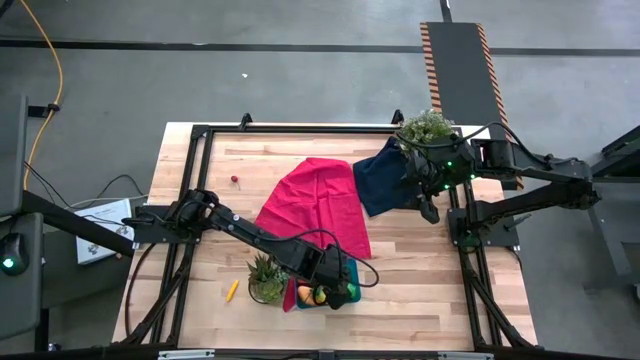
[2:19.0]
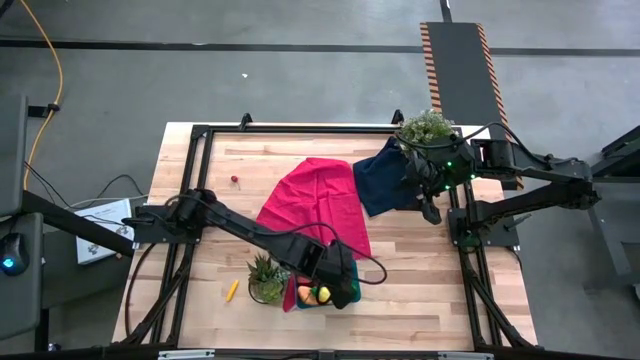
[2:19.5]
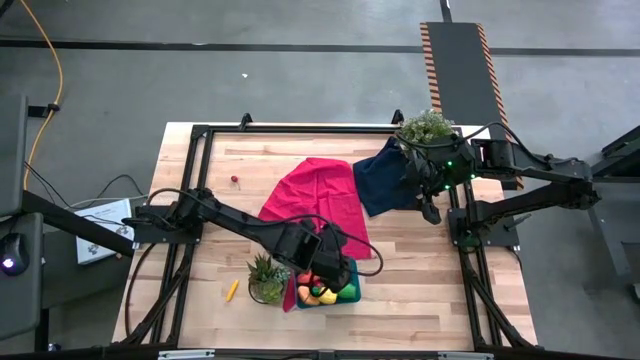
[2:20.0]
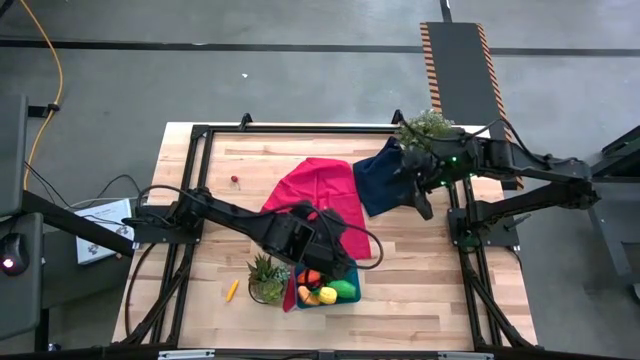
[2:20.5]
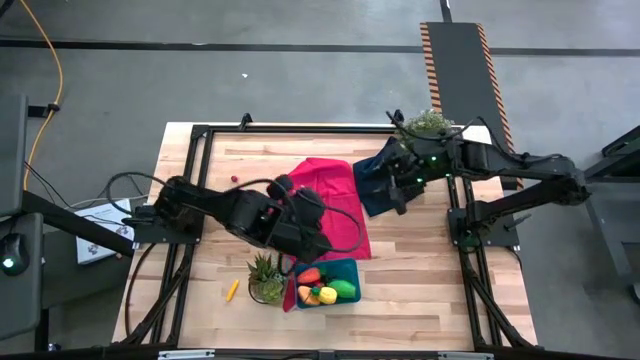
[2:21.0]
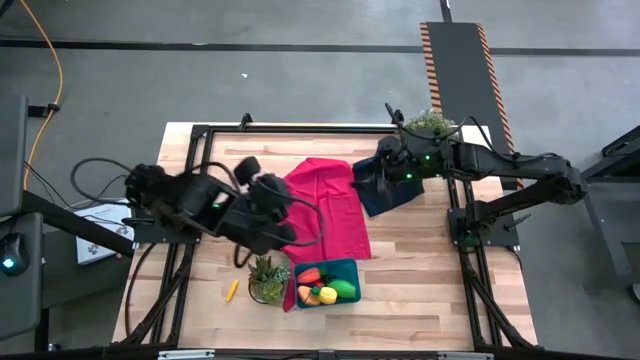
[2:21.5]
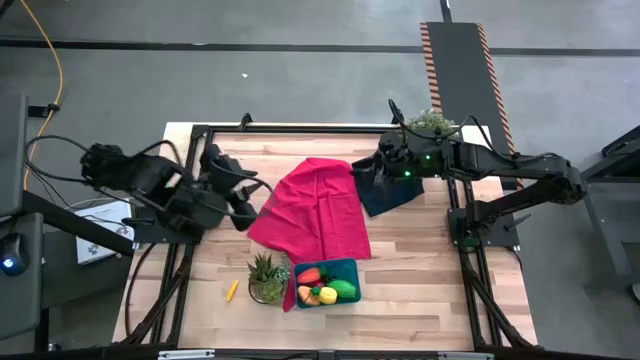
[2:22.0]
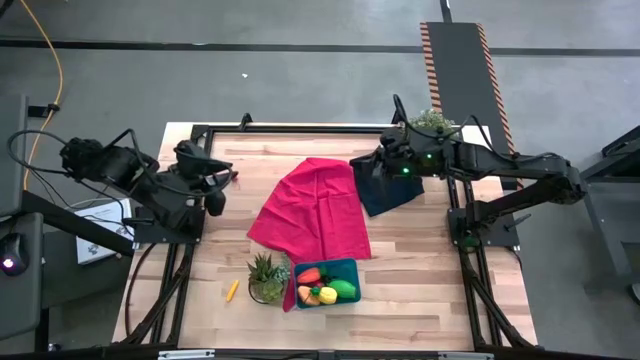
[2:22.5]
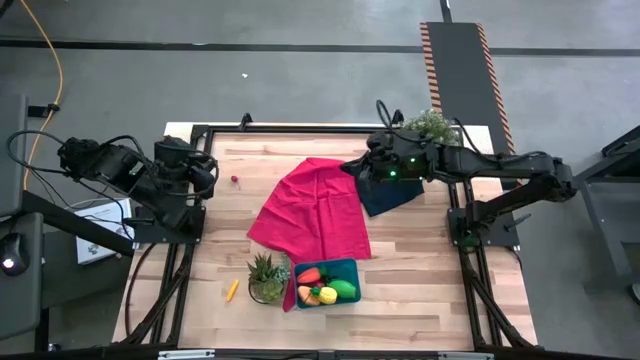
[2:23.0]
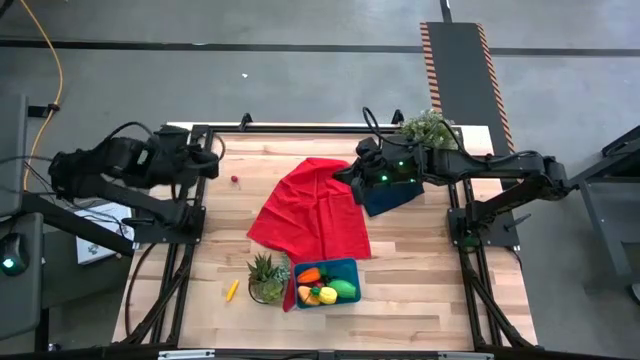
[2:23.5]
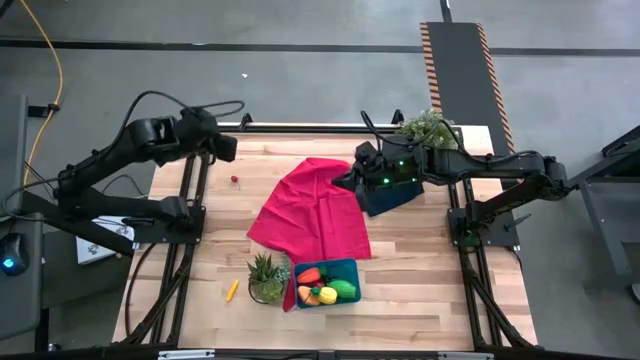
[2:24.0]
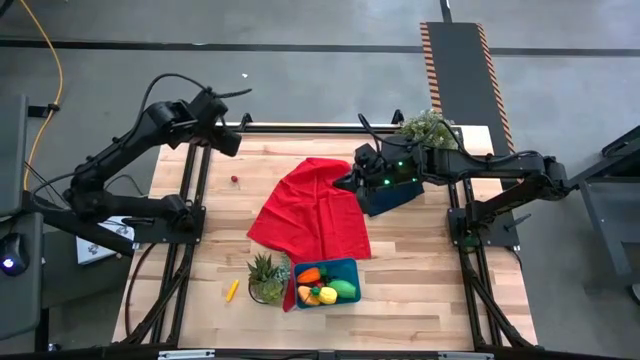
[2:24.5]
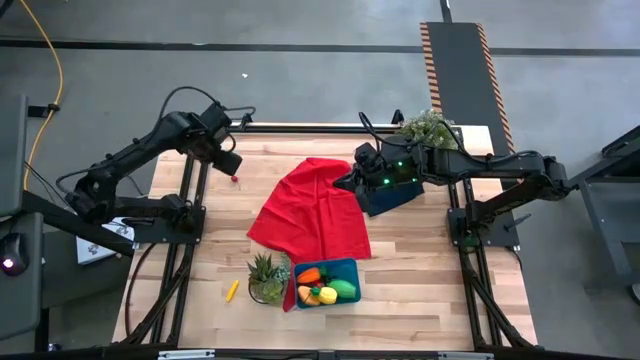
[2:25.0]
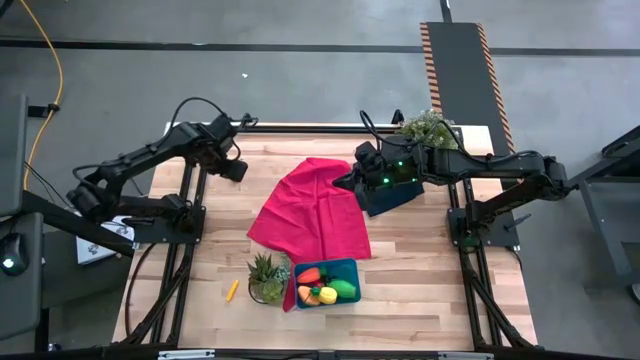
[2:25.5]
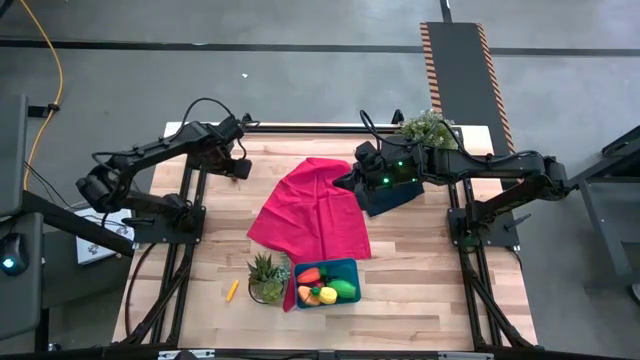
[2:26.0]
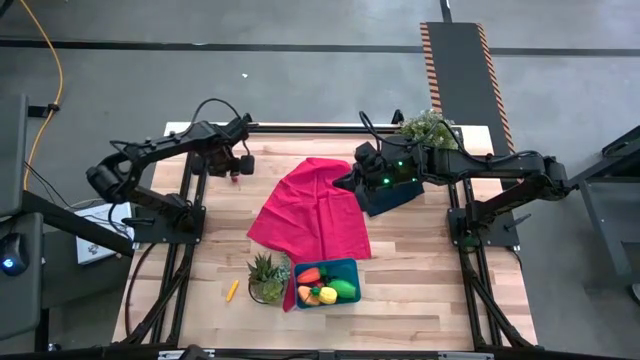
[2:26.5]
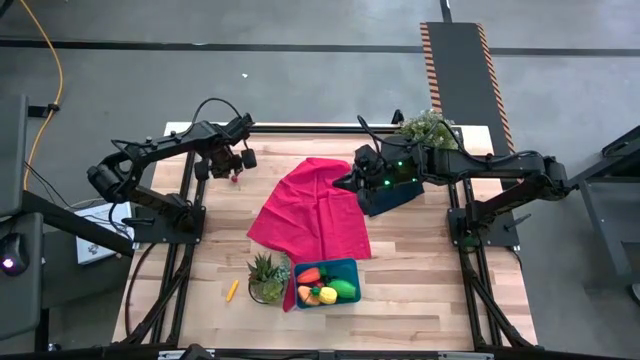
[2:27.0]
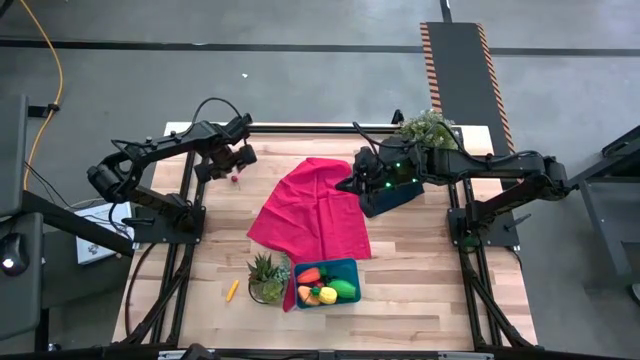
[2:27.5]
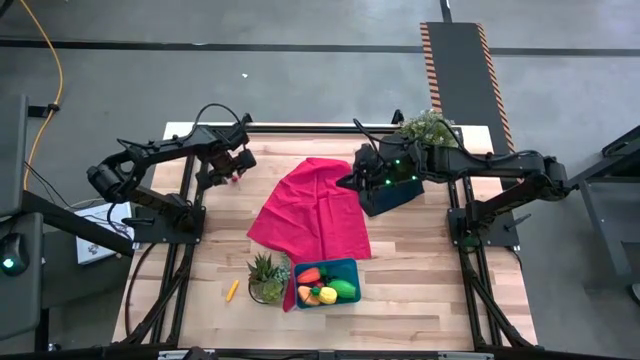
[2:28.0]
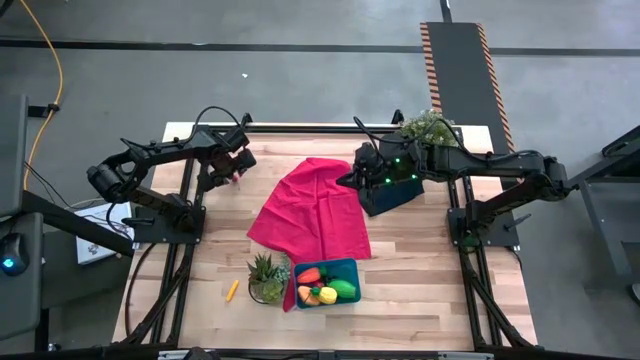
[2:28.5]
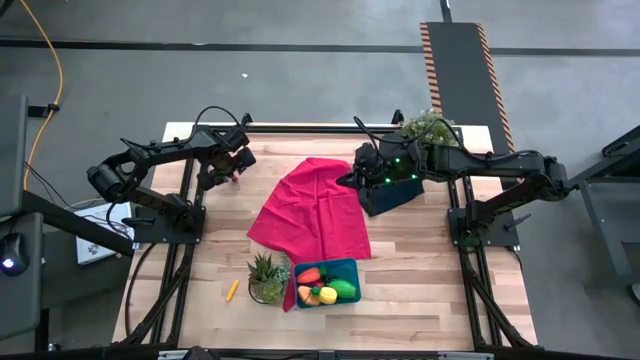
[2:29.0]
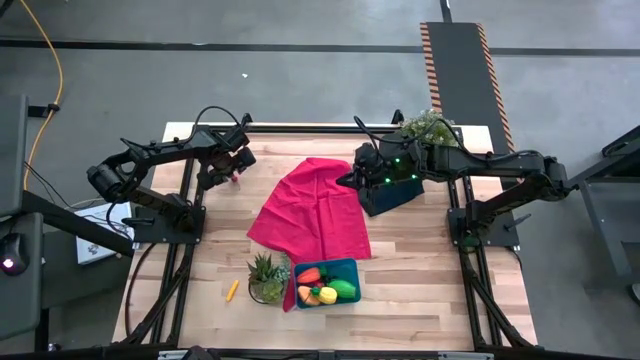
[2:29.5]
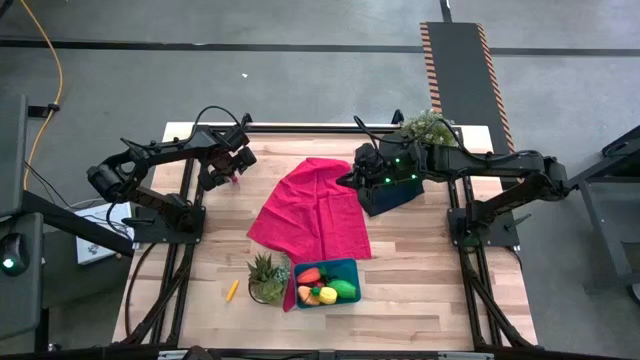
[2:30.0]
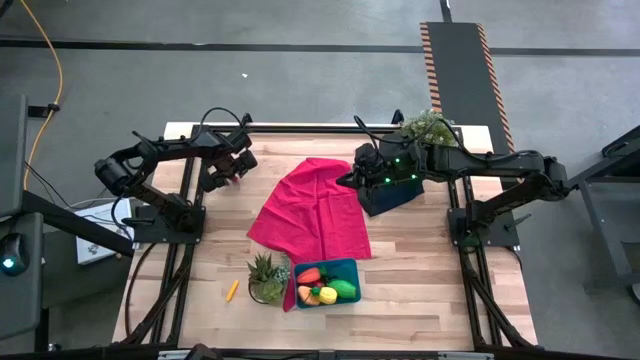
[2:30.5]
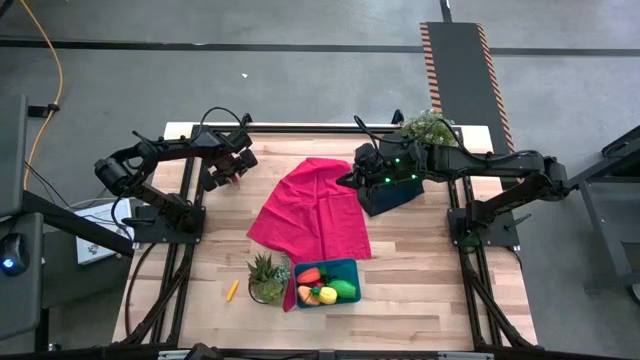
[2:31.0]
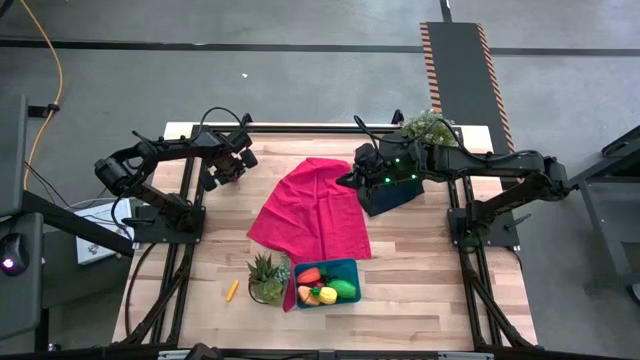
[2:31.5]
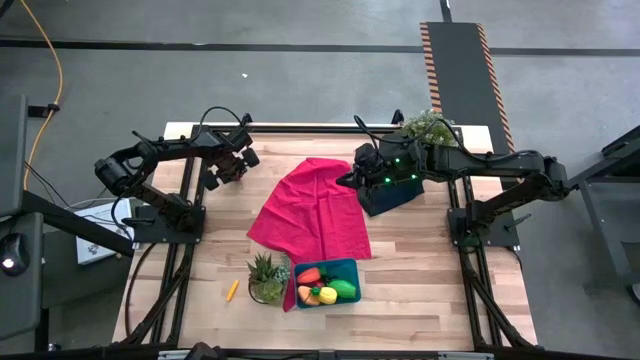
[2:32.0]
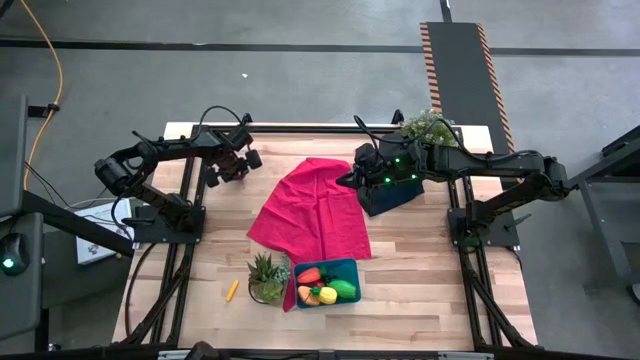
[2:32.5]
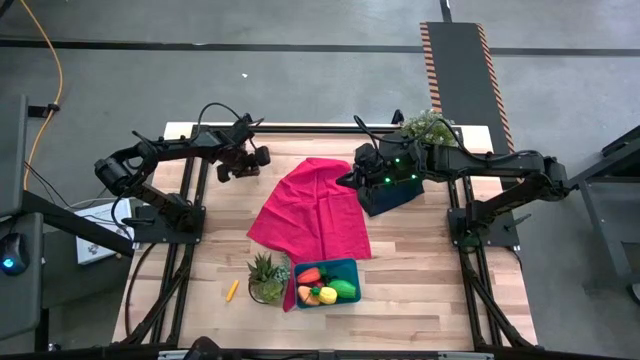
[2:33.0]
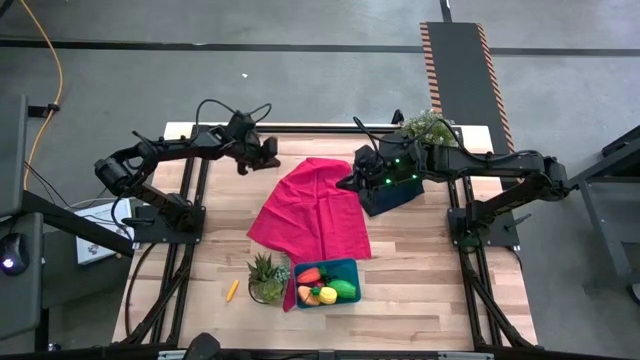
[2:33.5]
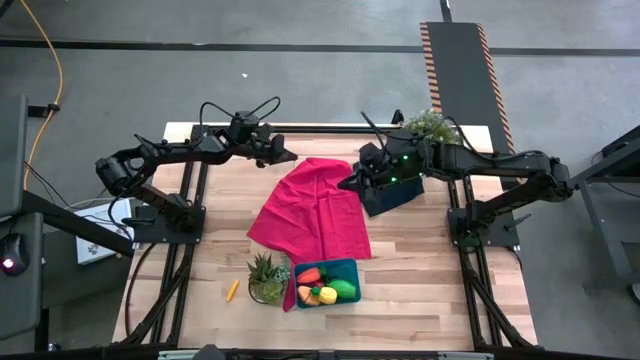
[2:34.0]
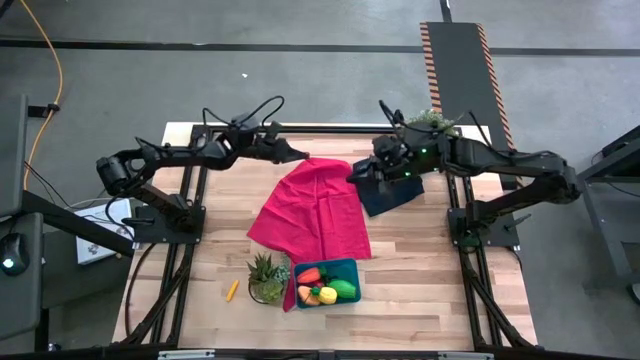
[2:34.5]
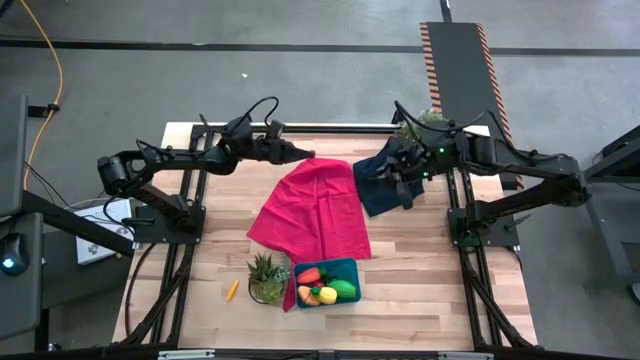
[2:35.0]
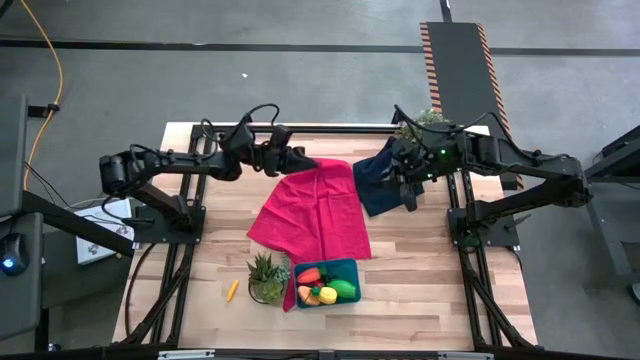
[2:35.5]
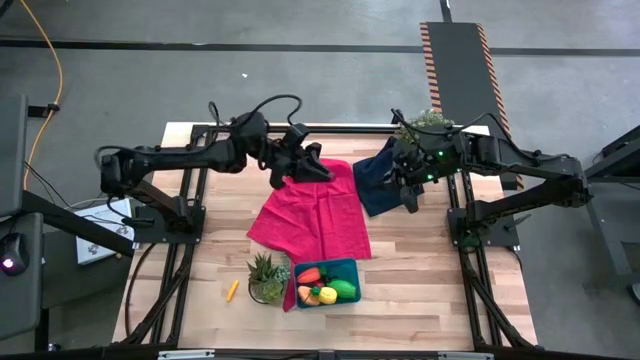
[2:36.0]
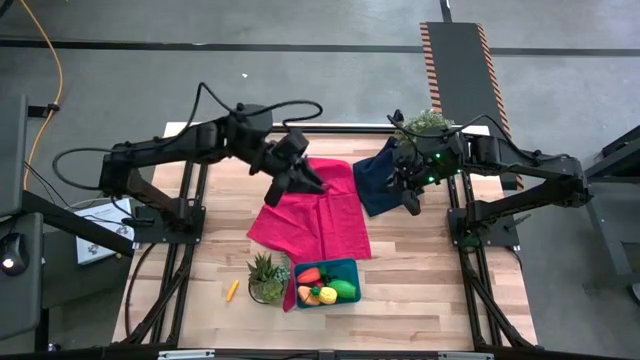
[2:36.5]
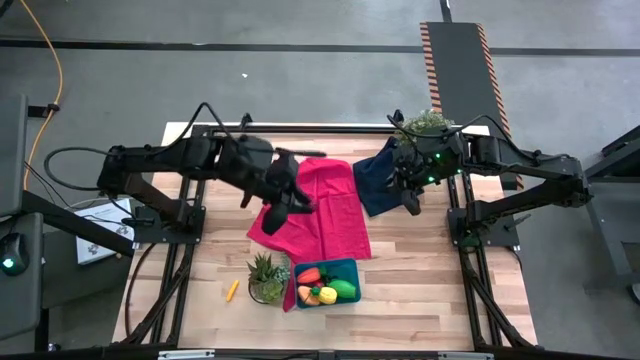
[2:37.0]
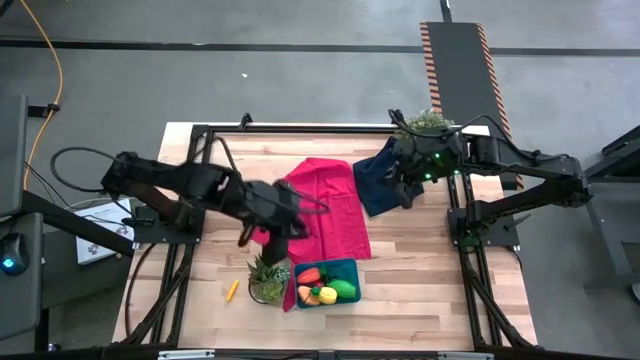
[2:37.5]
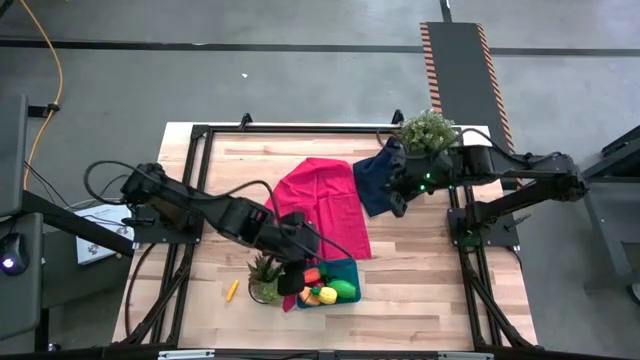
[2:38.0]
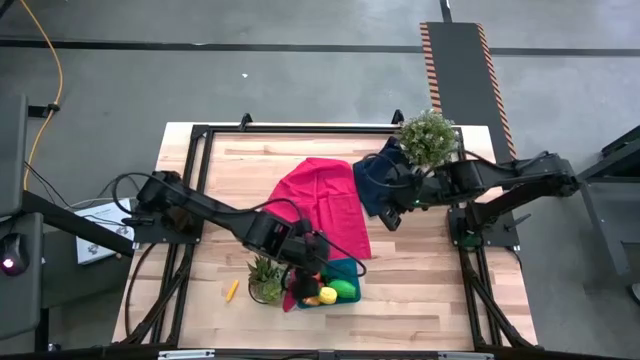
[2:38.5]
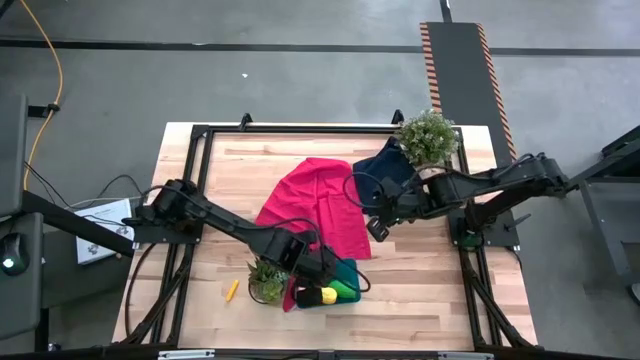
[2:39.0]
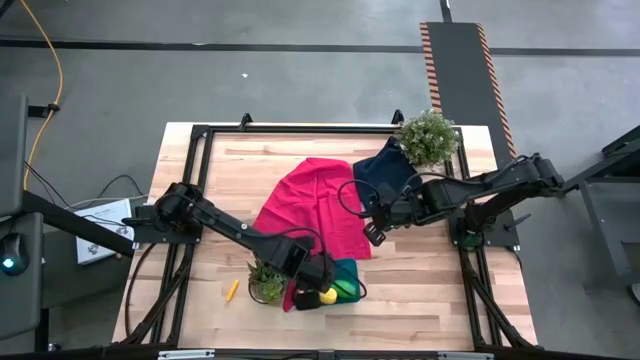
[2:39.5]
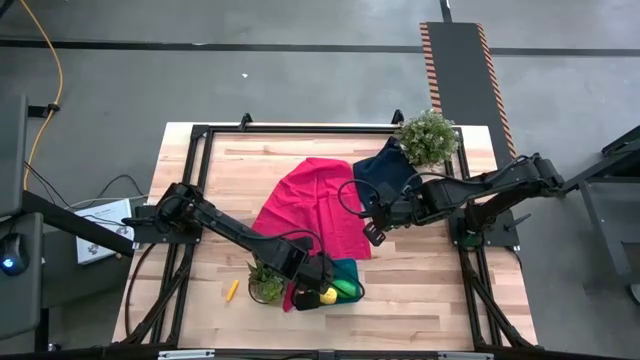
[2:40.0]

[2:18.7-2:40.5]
Task: Pick and placing Produce into tupperware
Put the red cherry into the blue bin
